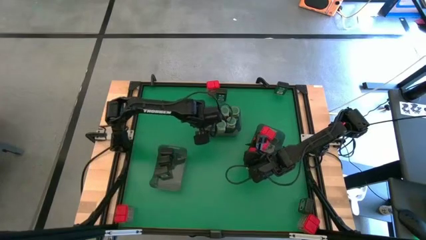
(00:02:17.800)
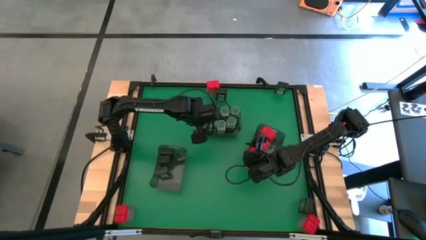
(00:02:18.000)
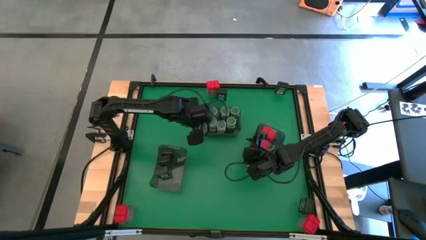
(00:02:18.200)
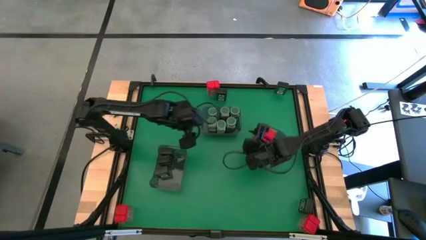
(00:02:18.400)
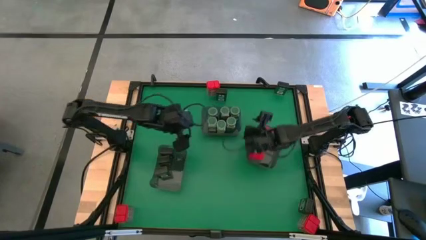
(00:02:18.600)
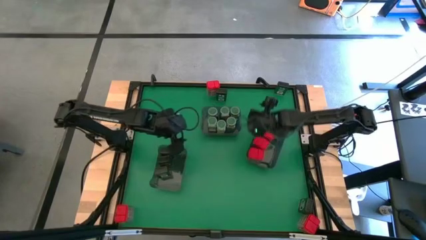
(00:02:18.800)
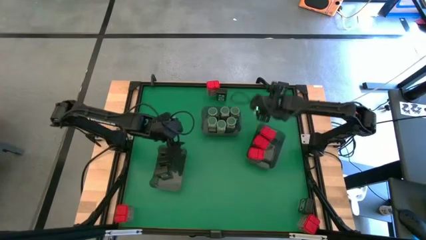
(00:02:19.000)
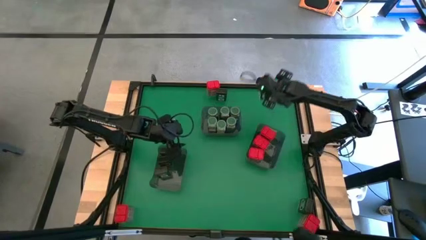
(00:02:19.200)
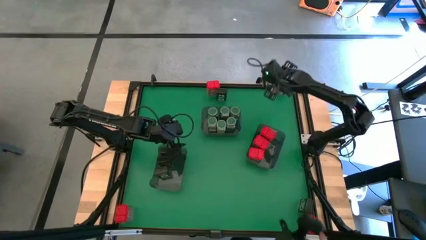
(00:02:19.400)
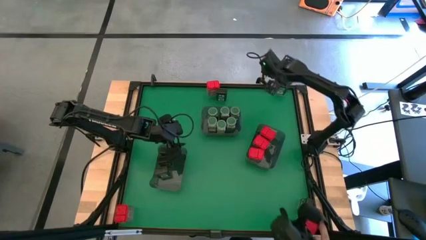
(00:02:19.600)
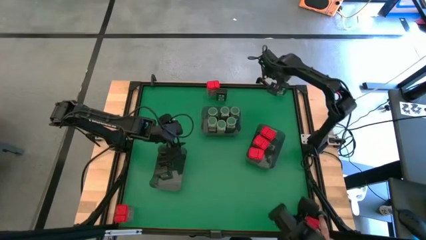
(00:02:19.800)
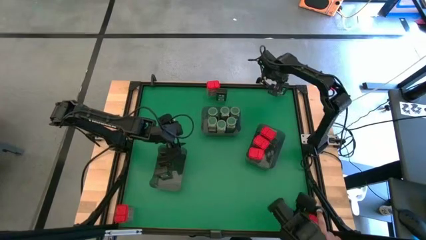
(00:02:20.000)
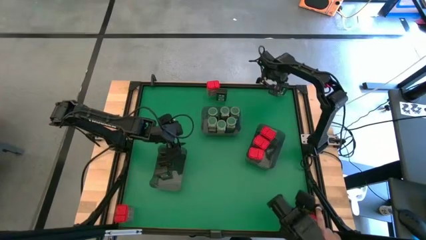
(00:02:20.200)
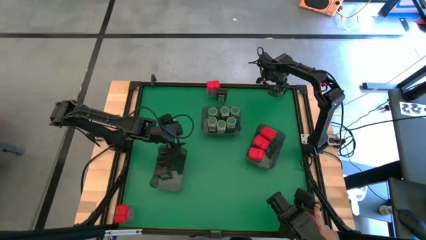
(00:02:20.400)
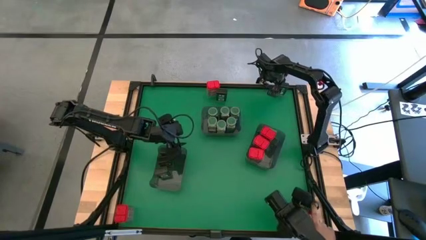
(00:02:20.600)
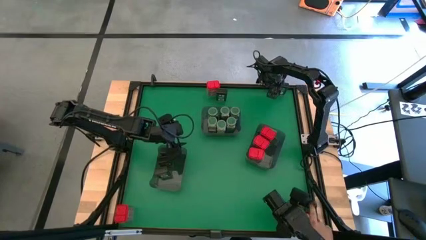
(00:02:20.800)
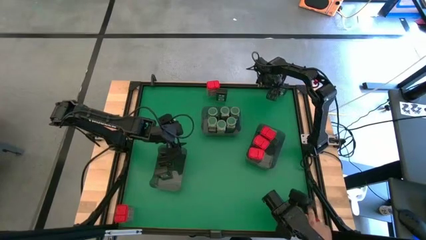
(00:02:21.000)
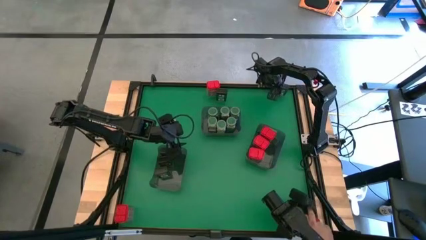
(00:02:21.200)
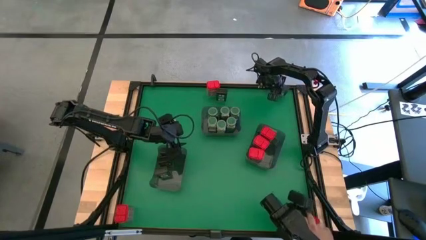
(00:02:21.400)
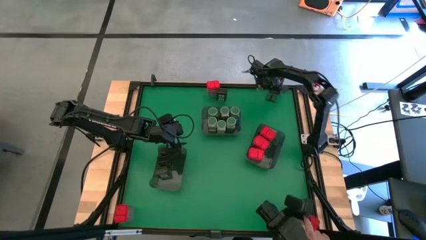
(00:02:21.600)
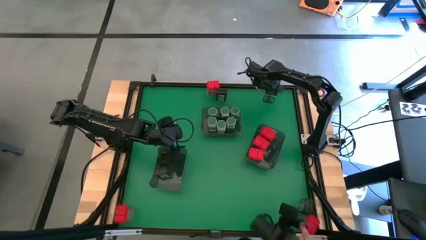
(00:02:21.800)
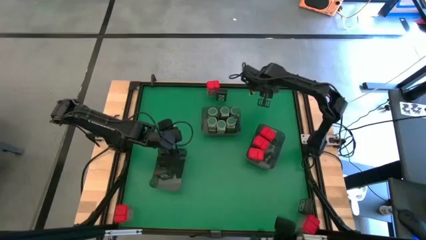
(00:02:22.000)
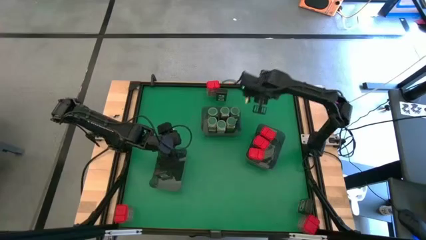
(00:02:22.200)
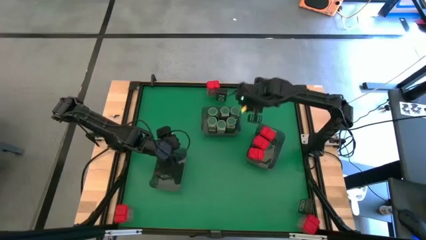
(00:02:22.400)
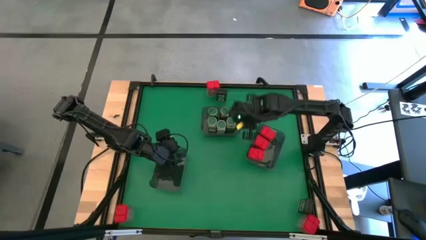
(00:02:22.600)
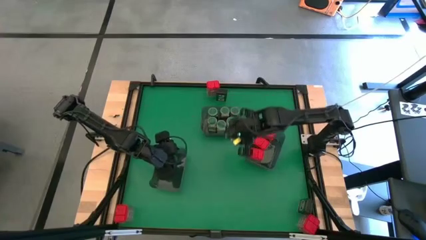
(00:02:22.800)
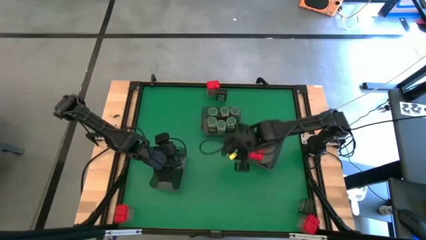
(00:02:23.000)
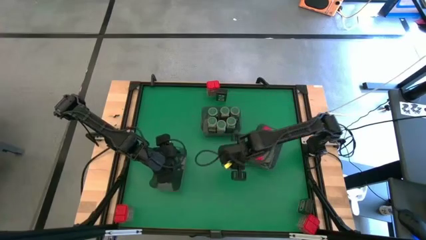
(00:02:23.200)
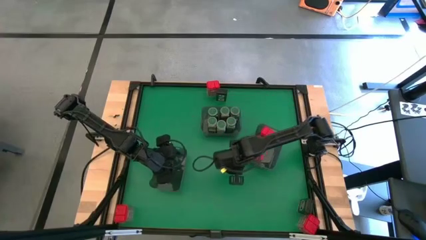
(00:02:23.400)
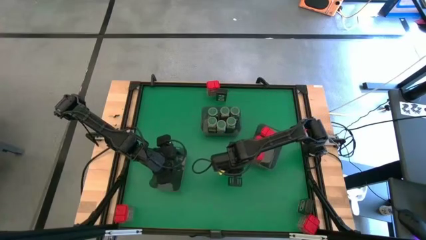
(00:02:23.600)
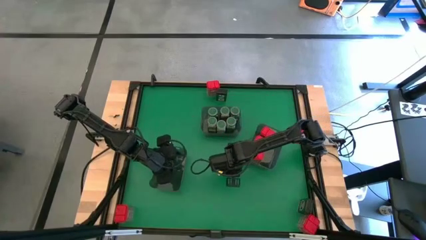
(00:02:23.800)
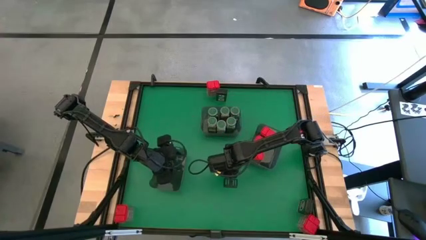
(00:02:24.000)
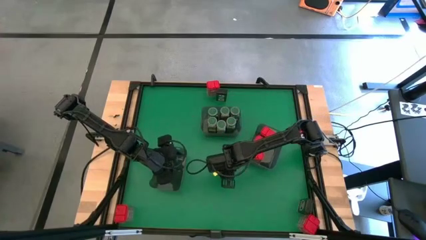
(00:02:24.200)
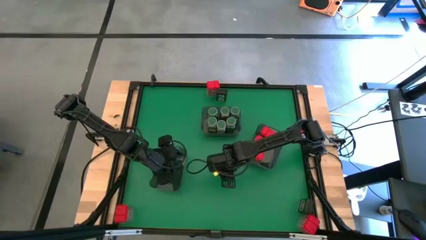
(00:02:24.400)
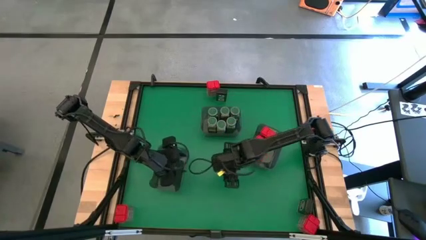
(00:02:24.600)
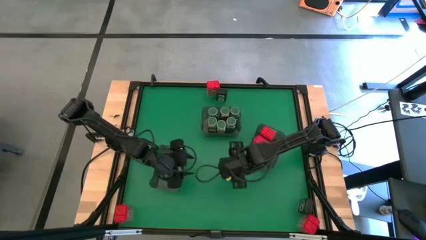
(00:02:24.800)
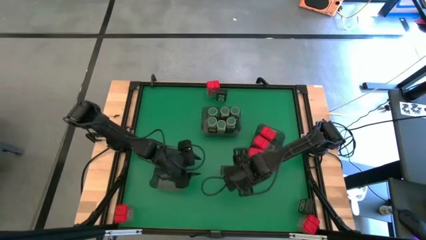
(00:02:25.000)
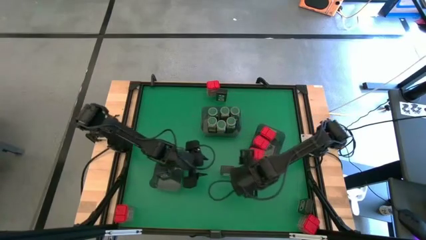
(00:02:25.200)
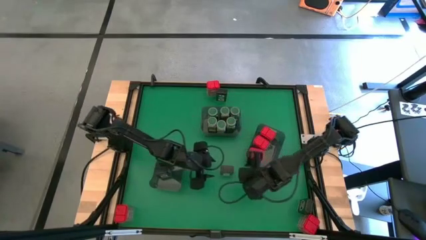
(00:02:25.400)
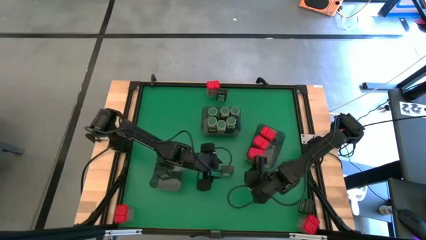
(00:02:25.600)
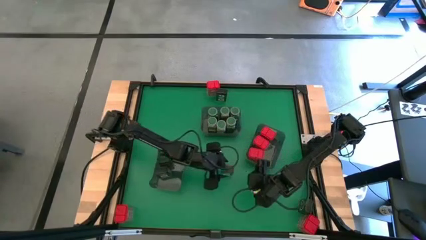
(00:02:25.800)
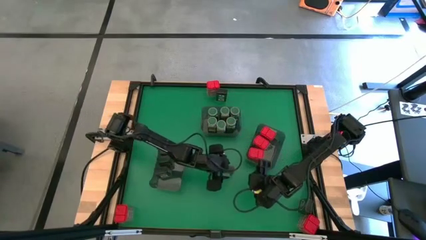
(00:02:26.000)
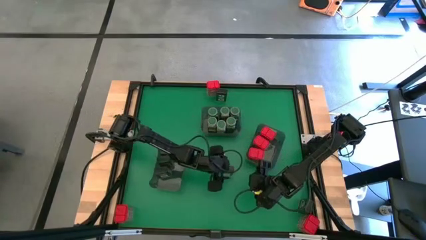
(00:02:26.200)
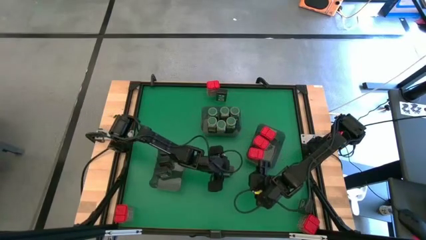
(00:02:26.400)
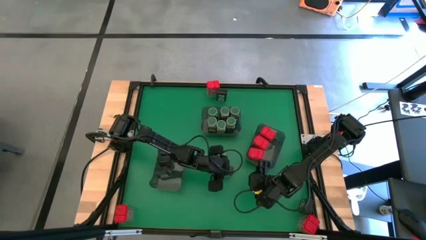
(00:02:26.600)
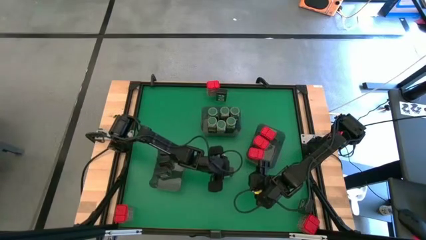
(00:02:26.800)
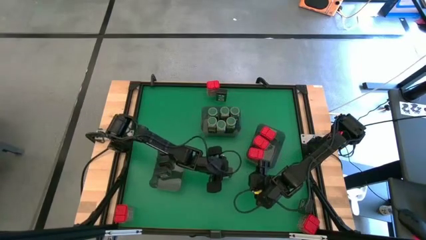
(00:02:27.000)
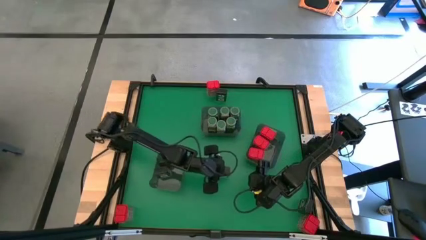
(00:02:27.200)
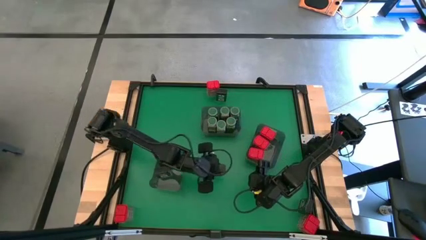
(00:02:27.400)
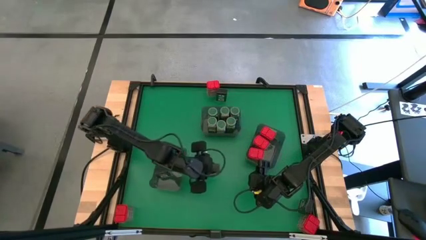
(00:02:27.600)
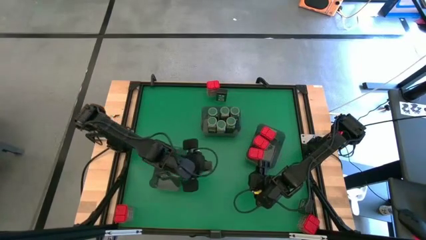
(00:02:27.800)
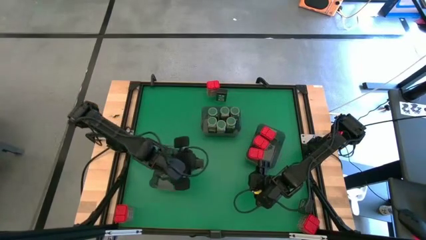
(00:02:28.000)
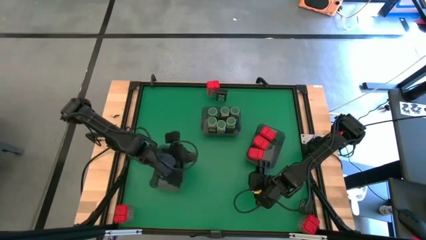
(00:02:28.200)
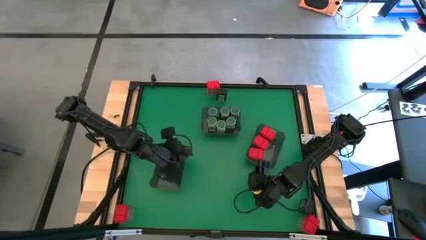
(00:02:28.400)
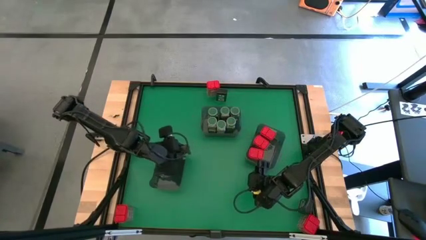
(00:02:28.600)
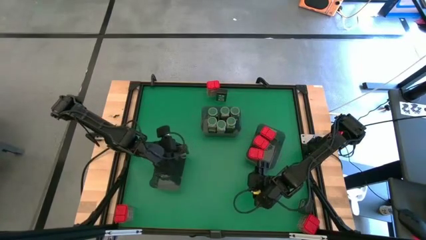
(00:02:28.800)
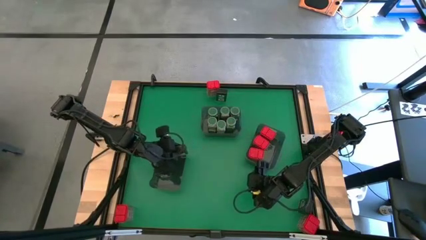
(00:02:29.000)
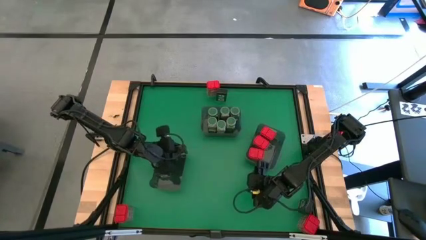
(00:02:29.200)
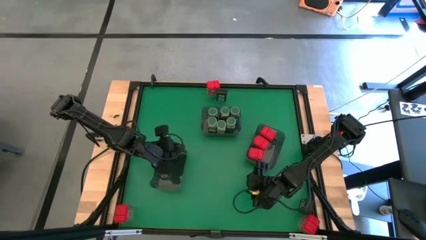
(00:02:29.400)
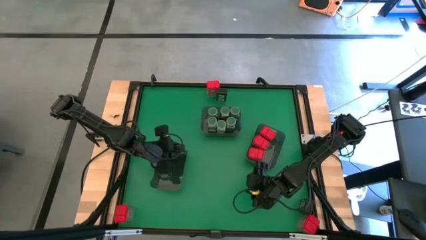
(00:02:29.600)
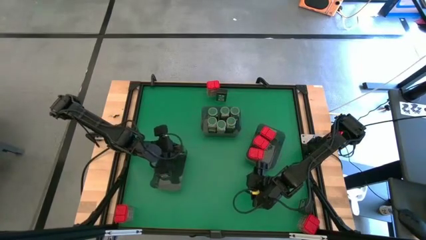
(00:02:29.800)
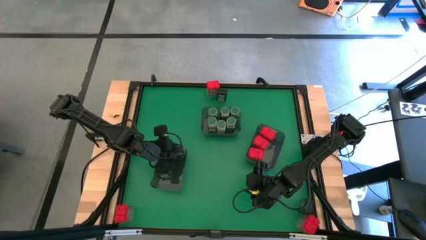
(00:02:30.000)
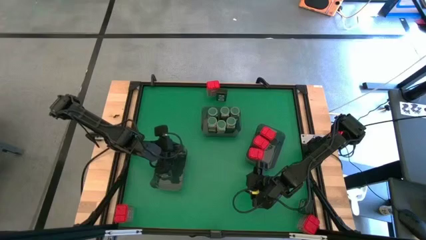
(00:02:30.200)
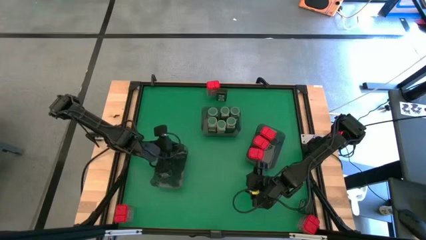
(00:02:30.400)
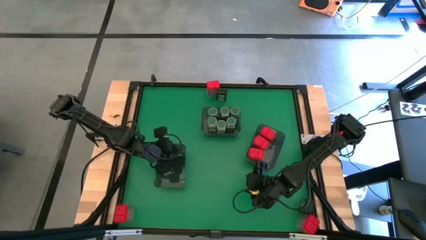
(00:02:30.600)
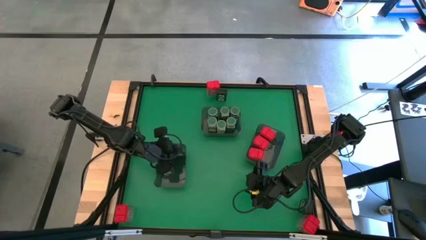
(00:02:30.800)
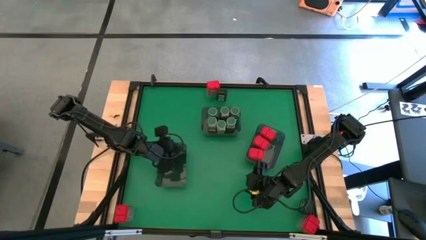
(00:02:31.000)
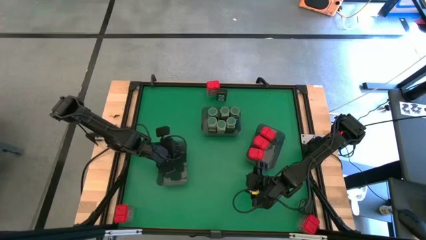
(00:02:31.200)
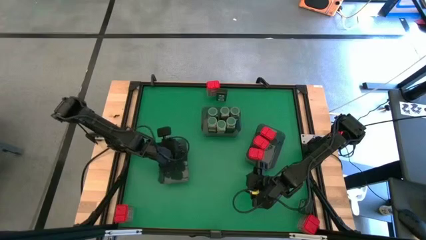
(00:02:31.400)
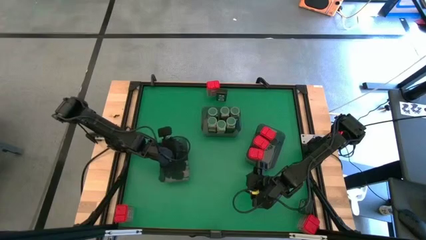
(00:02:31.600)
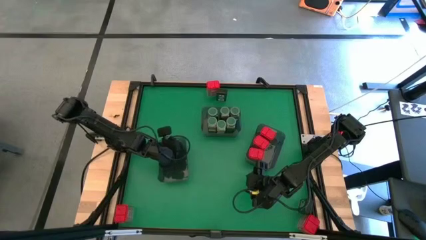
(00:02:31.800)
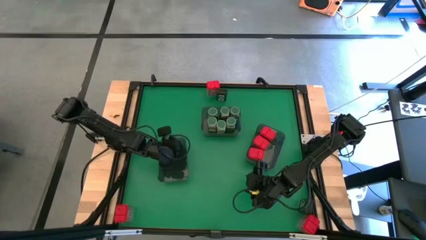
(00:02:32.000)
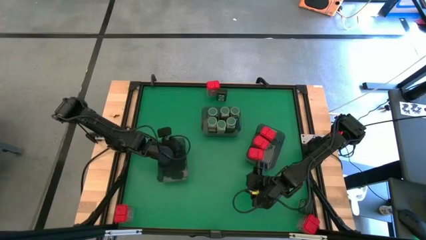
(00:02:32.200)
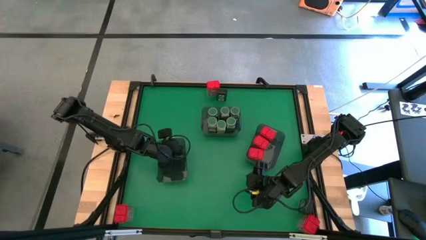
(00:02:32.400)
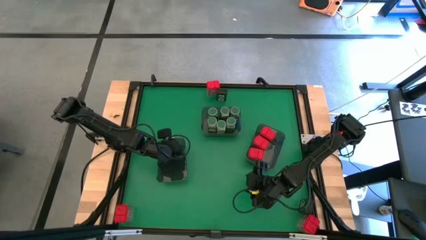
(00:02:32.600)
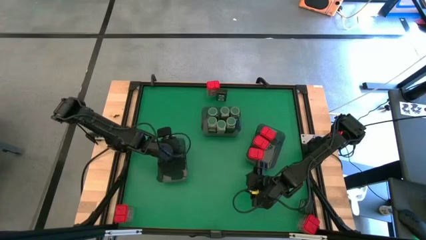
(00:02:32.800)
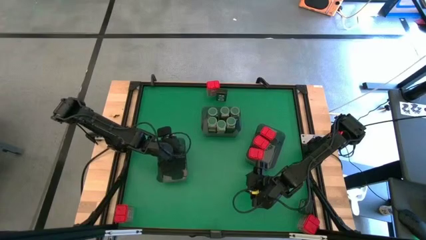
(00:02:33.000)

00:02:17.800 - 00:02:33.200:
Task: Sort spices by type
Put the black seasoning can into the left black bin

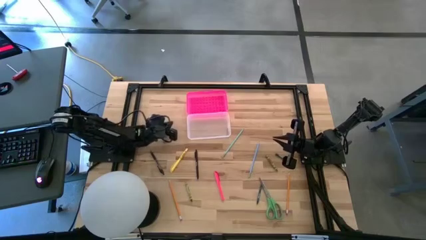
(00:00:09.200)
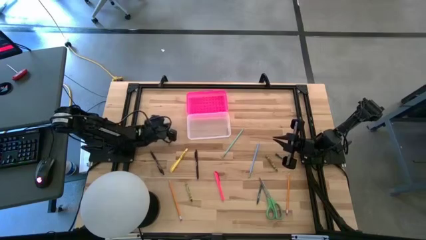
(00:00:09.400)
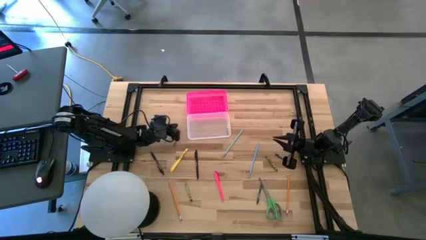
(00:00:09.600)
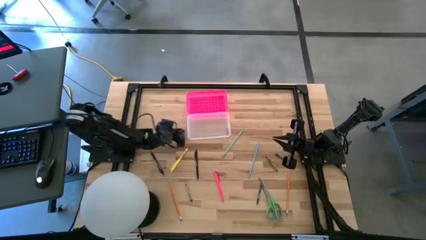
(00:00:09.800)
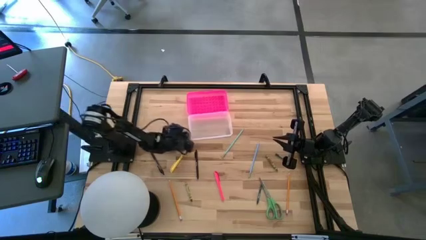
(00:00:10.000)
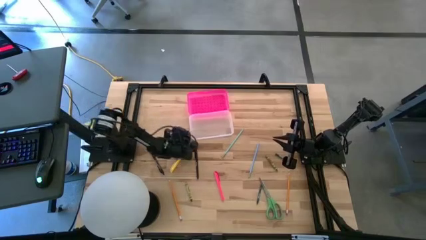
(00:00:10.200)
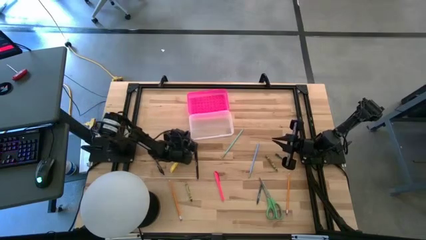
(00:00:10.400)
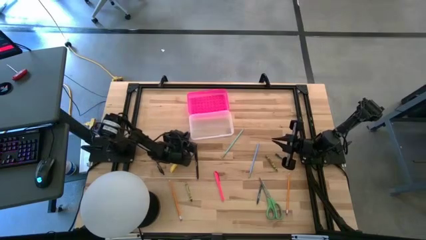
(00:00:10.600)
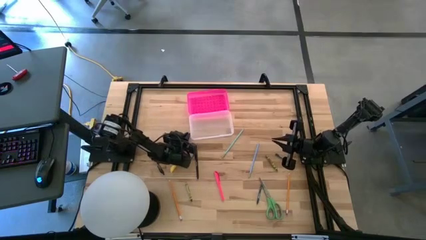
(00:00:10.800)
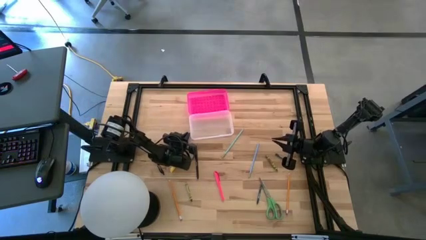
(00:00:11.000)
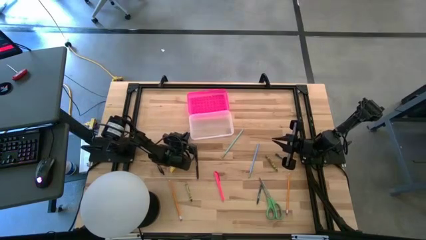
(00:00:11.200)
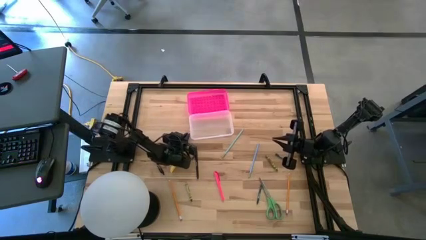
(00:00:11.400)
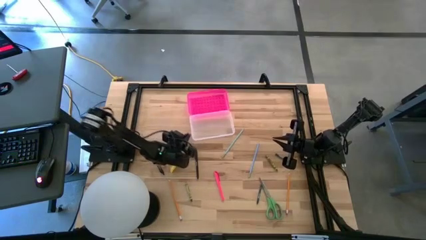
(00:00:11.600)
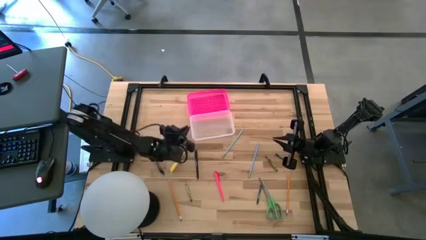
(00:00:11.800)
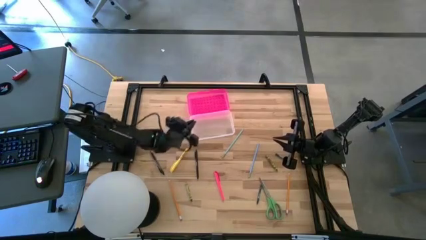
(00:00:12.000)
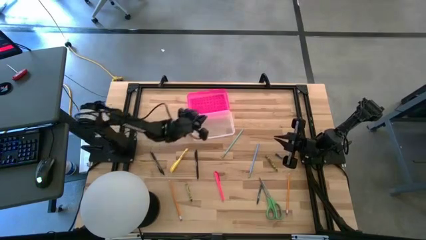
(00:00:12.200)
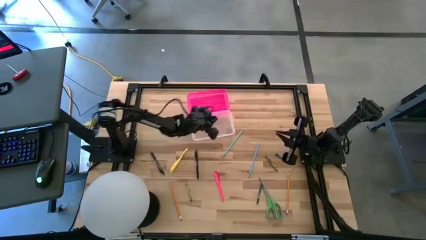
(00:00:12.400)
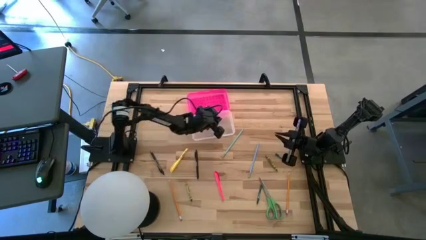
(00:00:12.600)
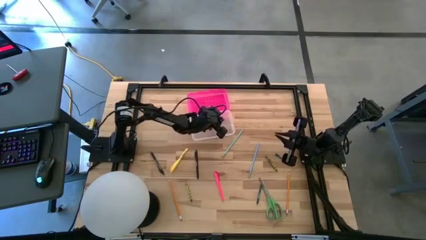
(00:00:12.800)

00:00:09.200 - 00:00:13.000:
Task: Pick & place school supplies into a supply box
Put the dark green crayon into the pink supply box
